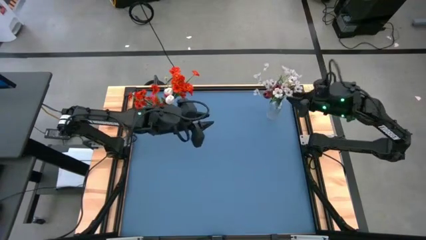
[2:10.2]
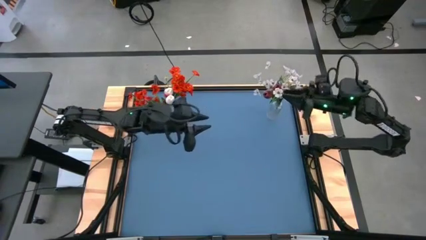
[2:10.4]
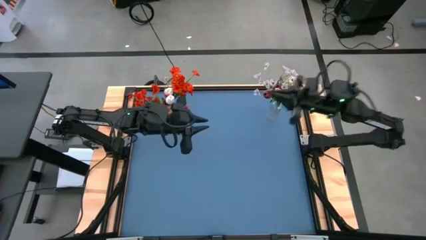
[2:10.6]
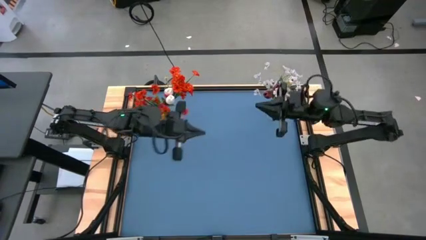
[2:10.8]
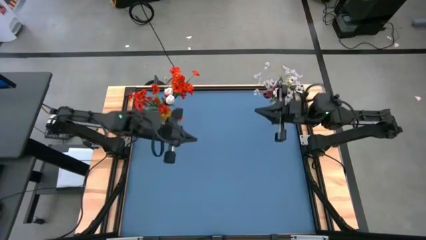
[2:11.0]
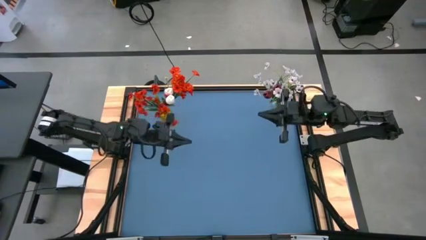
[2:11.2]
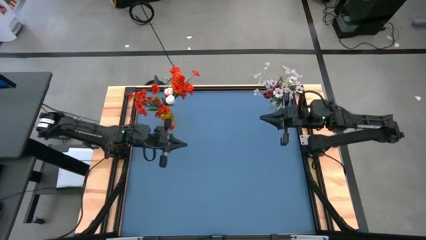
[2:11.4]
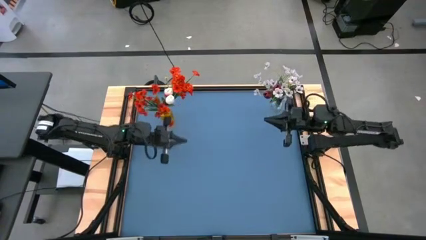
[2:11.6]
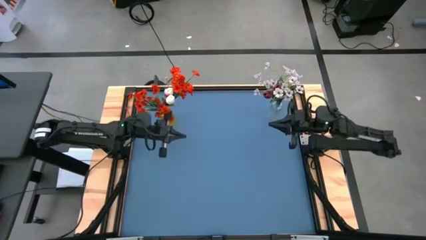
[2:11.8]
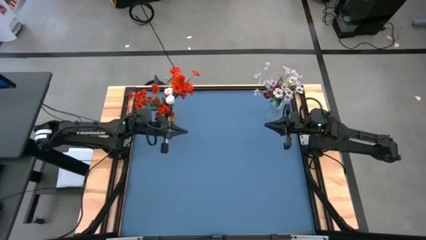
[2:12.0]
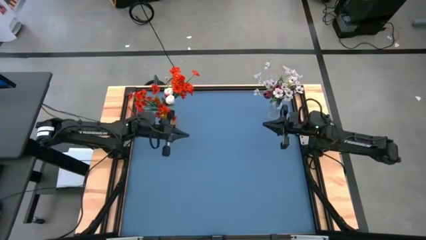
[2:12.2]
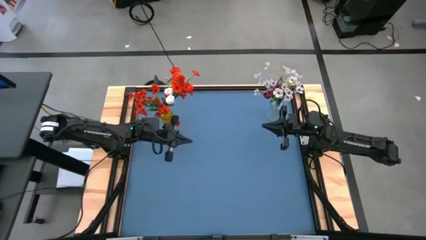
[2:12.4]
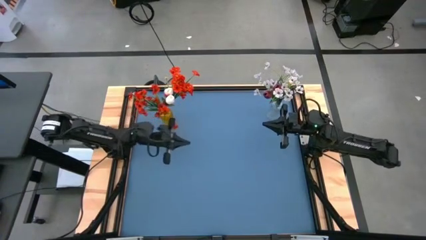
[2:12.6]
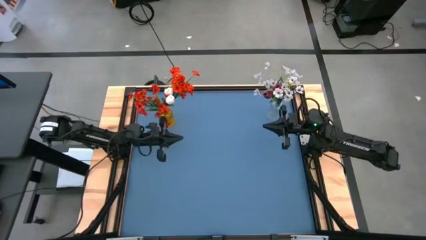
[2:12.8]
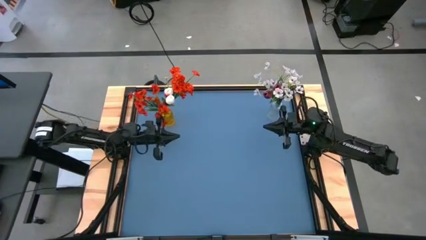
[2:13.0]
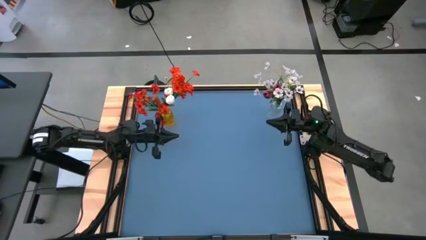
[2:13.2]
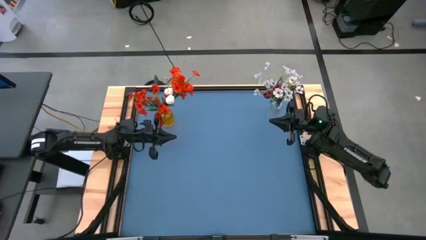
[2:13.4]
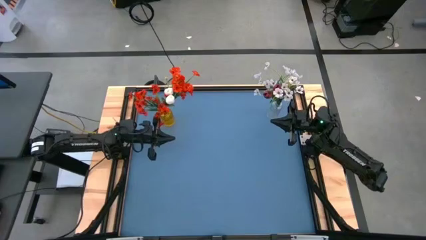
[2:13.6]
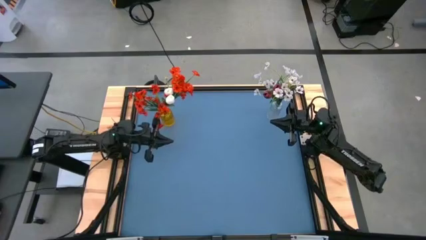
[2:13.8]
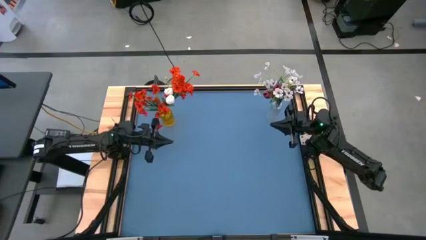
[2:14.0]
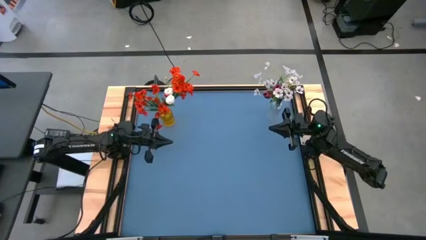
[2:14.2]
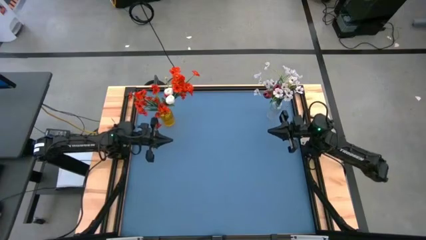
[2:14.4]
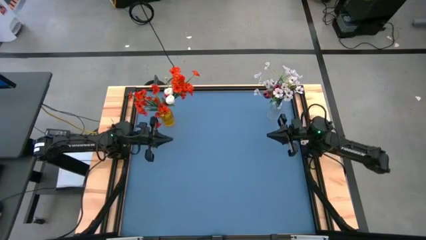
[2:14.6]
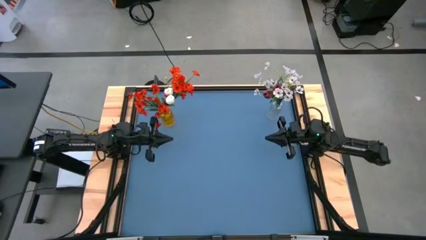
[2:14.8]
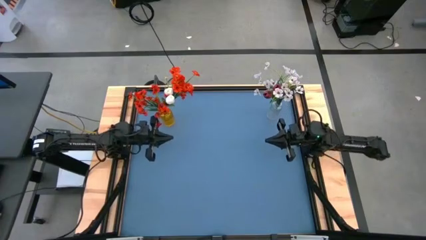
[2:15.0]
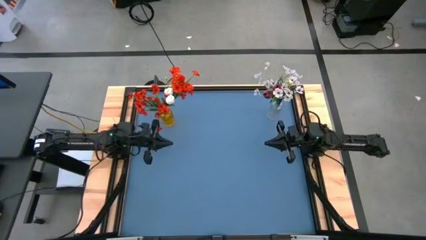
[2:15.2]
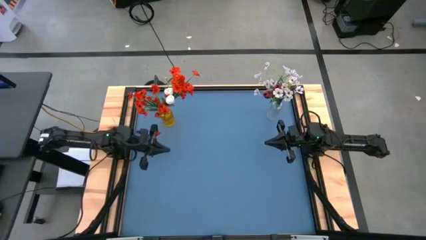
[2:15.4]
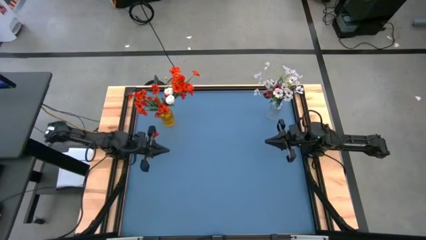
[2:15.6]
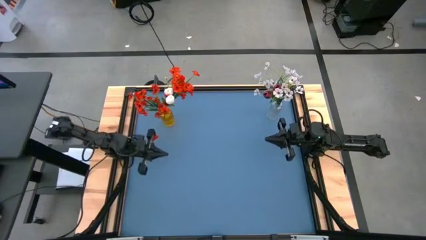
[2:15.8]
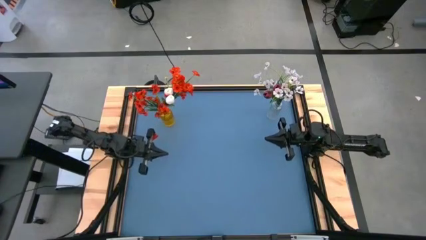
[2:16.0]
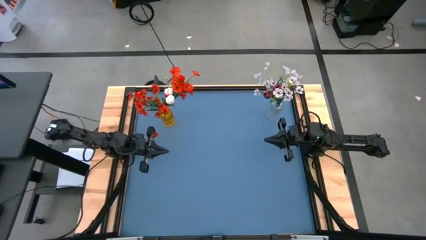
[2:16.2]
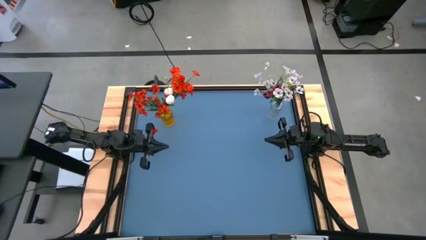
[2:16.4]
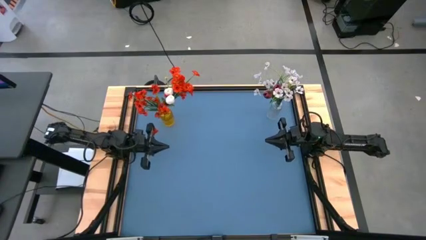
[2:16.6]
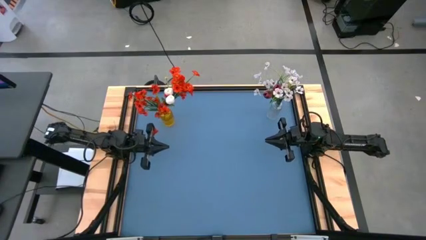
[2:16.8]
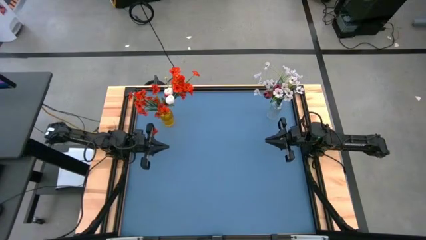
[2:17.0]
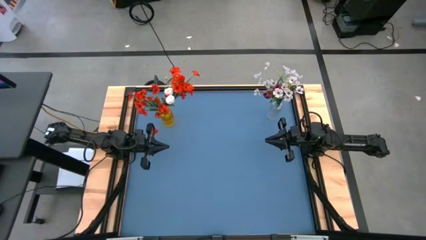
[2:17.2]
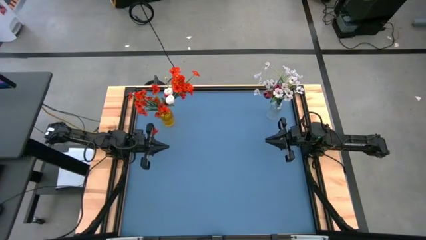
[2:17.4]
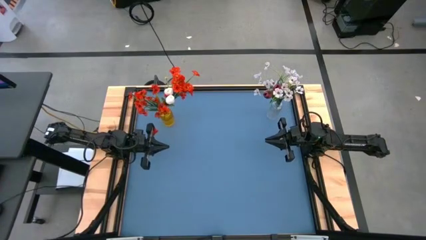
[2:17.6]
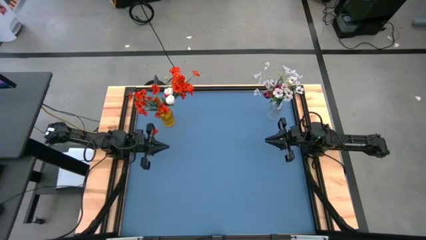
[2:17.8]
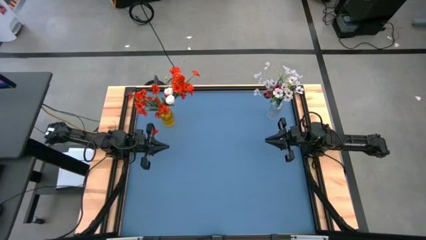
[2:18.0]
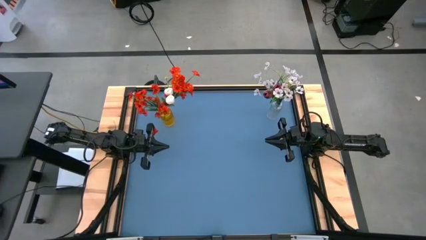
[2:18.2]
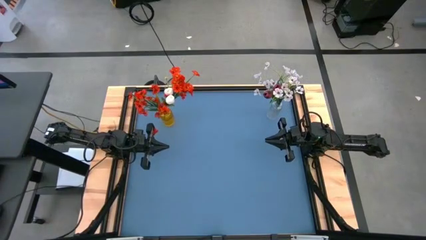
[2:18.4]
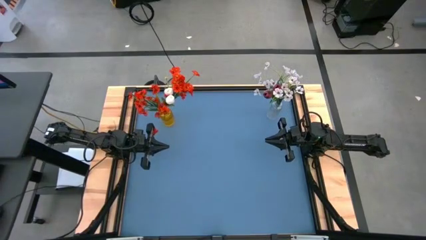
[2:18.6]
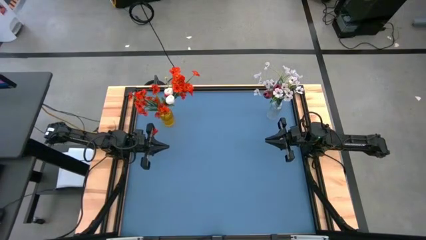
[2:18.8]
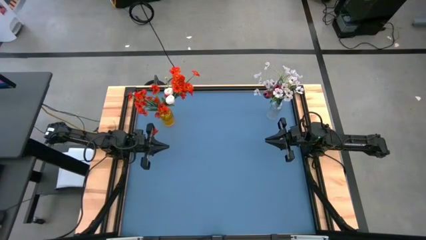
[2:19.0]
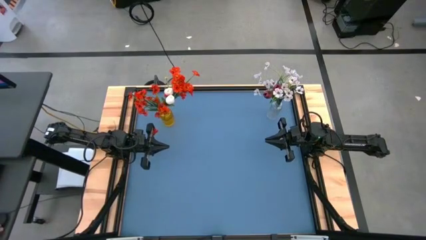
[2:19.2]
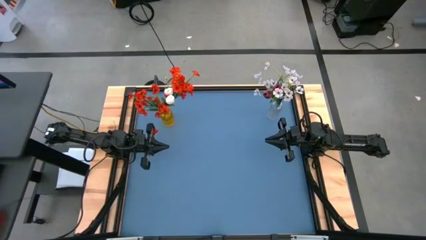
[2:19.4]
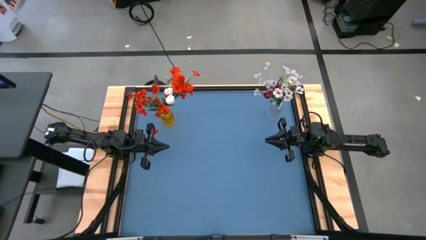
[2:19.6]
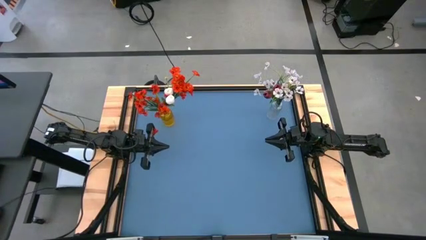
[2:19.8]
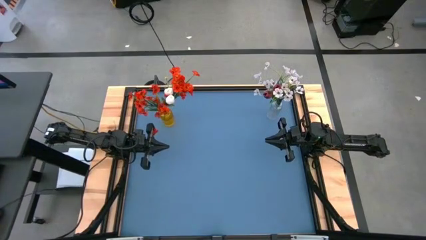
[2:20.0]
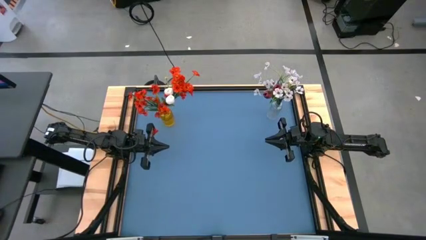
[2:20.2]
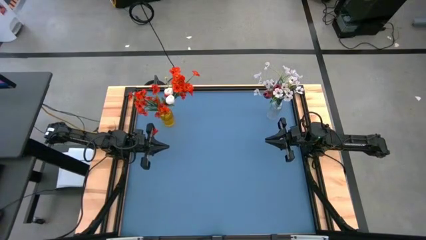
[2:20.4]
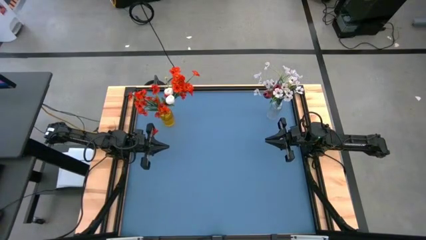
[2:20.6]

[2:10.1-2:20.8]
Task: Sort flowers into vase by color
Return to Home Position

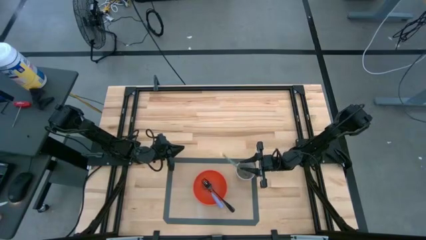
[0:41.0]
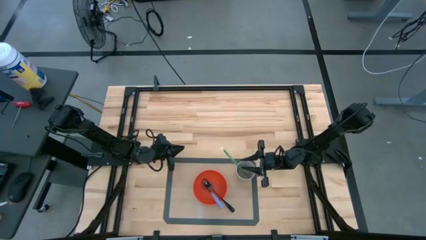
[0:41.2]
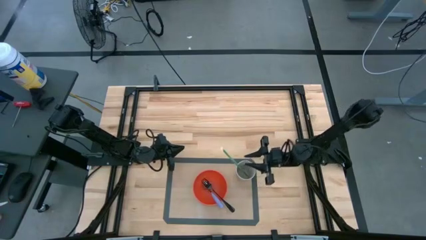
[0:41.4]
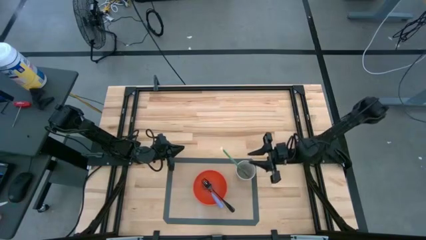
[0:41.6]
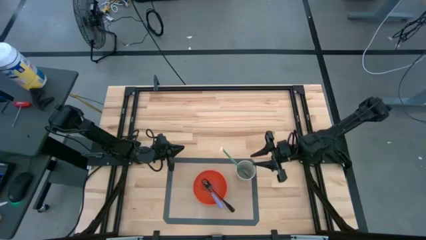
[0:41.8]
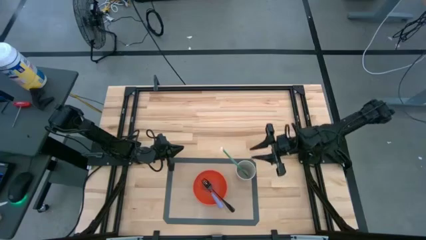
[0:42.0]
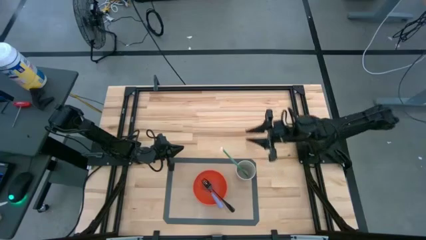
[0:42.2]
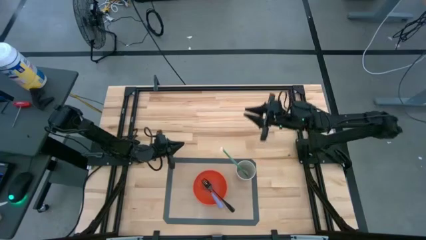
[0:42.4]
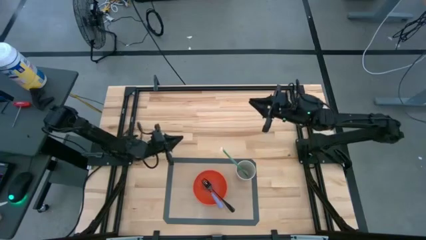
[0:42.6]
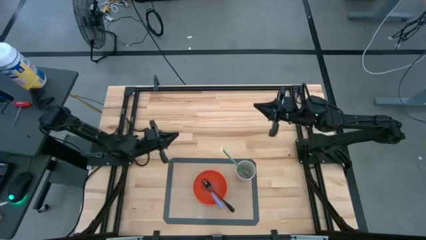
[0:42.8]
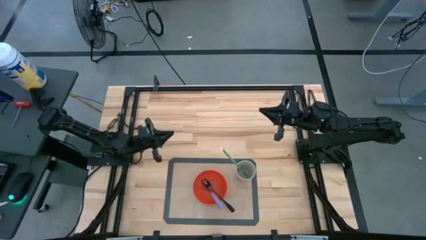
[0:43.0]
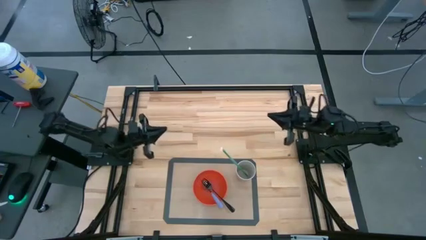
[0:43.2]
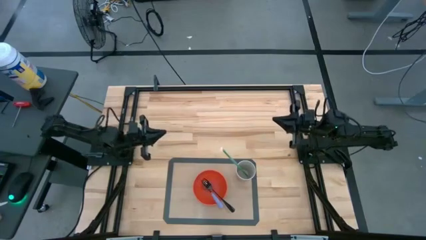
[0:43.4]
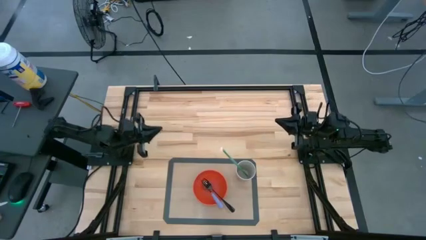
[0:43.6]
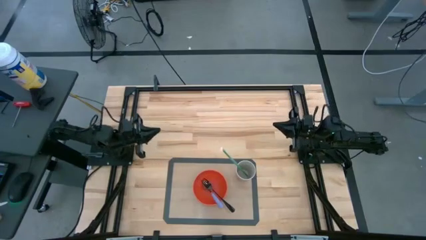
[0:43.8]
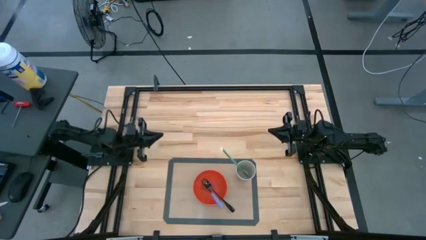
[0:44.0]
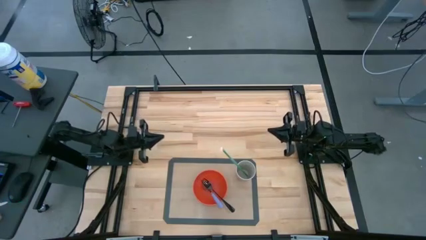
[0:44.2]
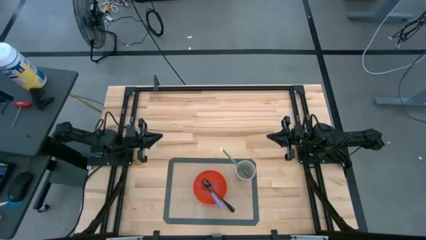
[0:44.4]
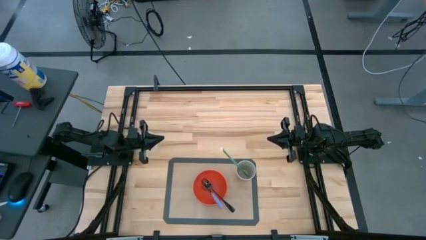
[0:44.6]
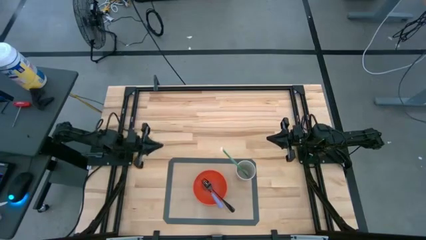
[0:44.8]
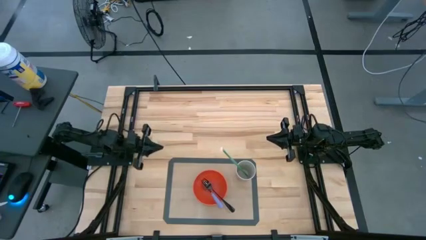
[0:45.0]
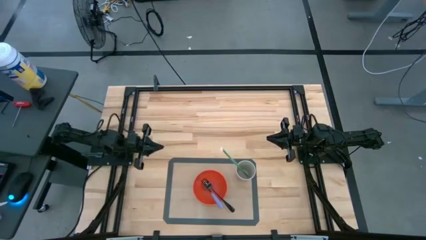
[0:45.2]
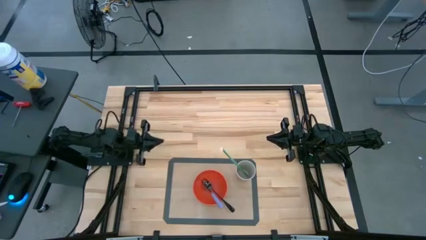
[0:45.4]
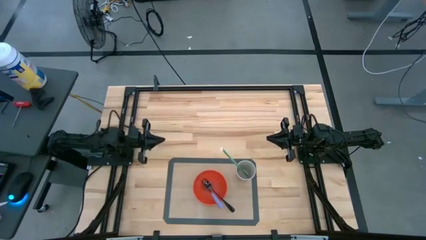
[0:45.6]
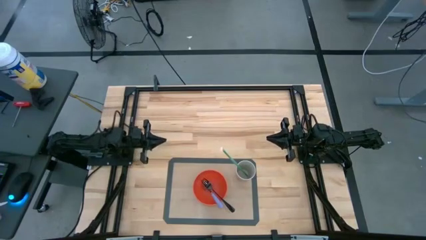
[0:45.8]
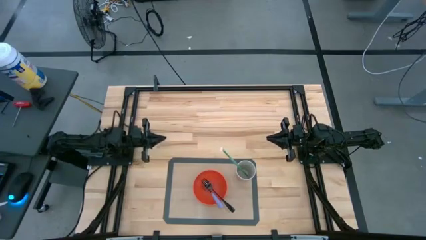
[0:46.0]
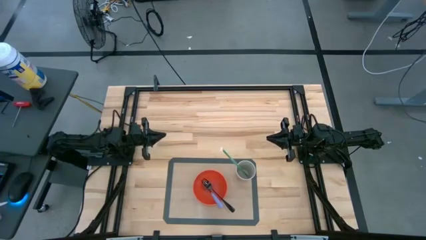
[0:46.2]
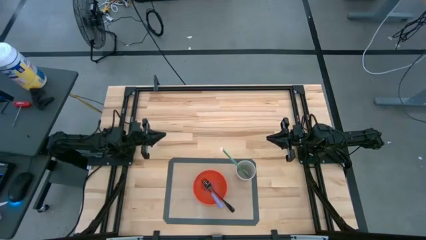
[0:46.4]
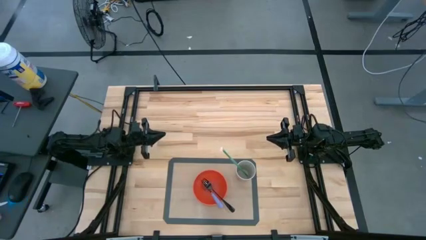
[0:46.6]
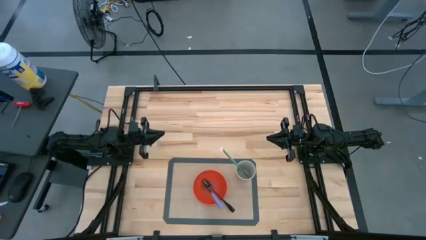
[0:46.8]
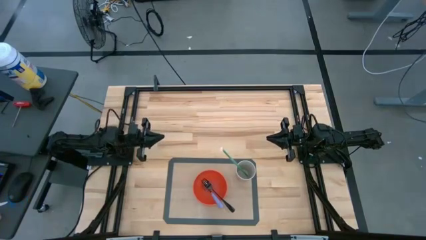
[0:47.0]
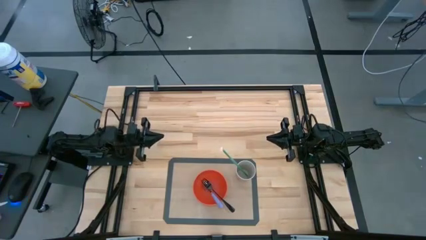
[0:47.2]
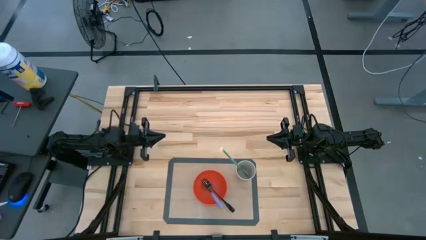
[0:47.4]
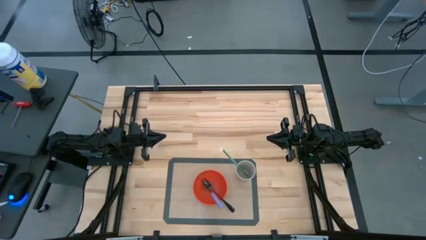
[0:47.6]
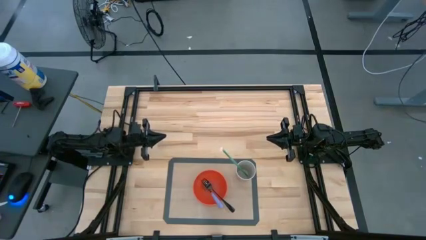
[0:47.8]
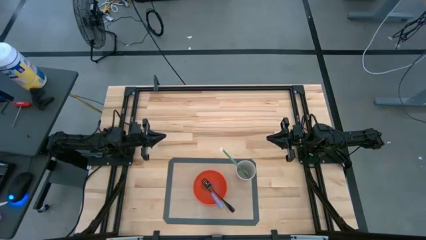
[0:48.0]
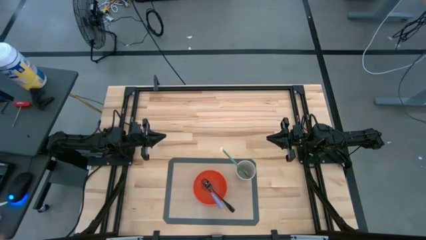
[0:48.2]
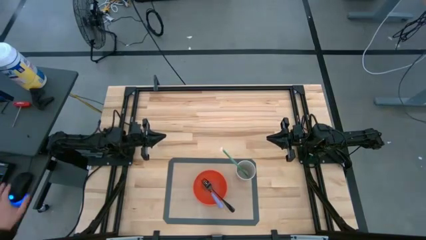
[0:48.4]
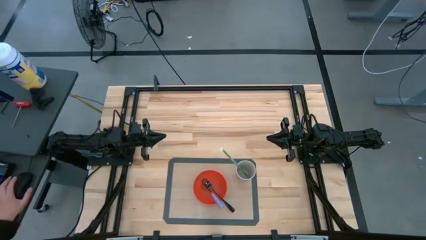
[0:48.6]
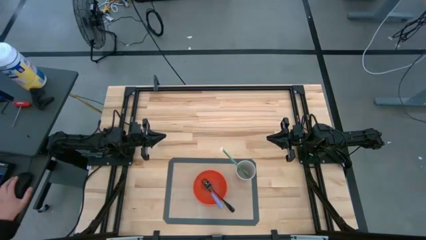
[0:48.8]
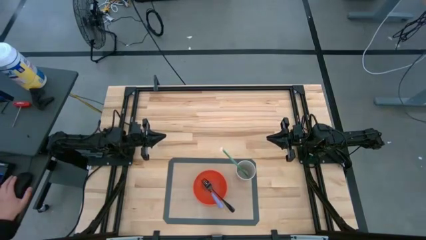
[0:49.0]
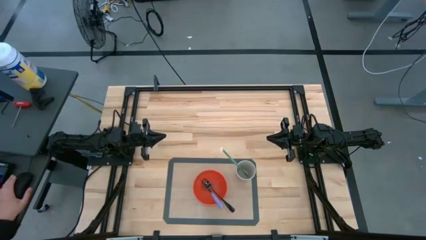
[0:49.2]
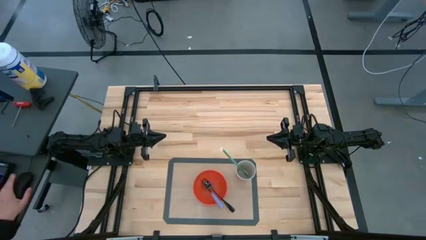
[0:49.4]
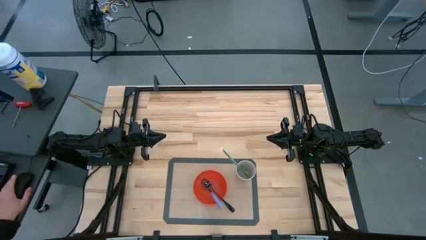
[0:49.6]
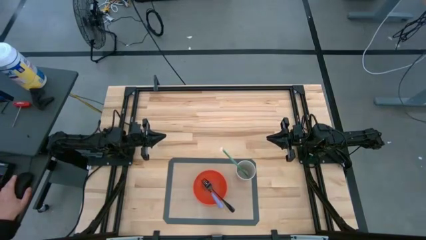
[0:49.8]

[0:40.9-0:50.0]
Task: Pick & Place Utensil
Return to Home Position
